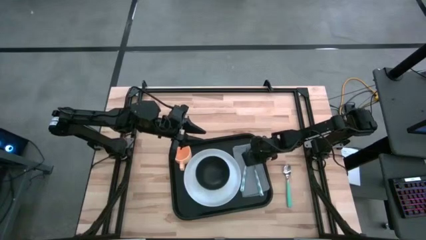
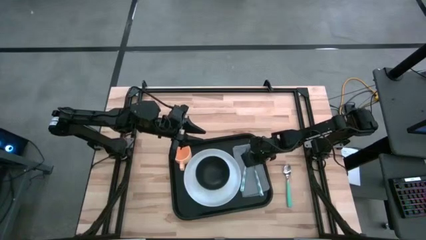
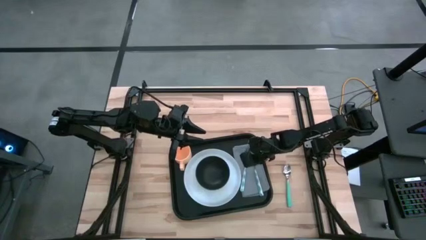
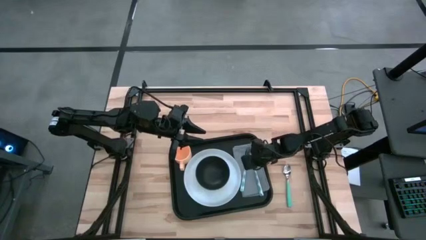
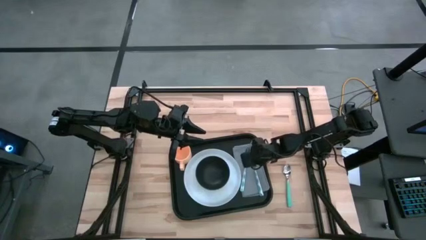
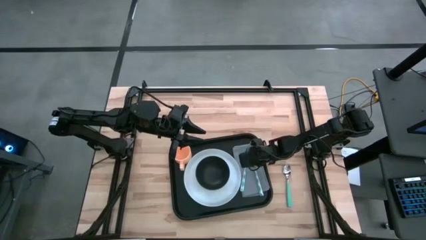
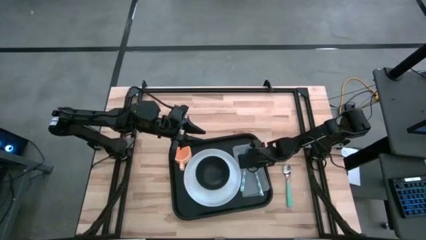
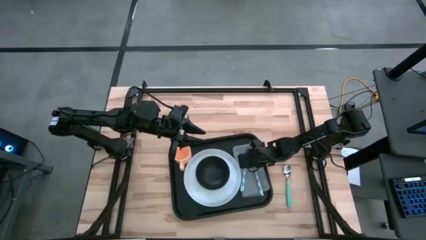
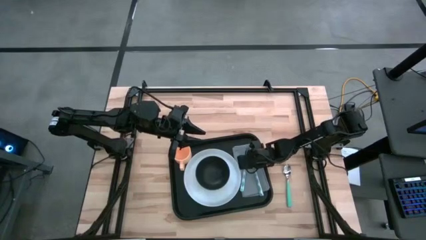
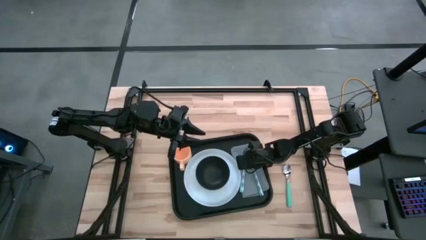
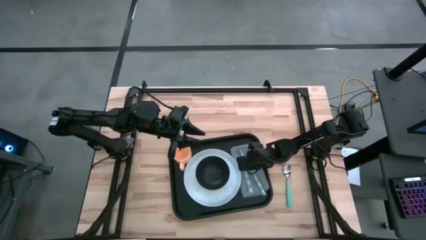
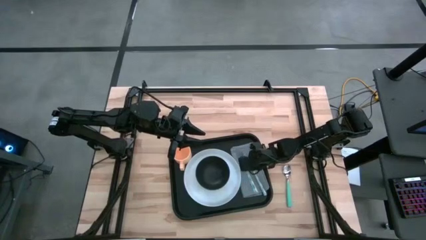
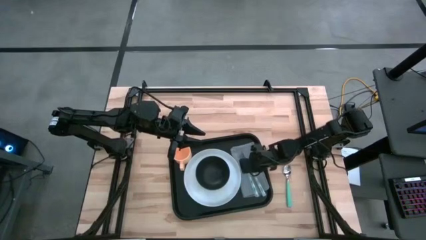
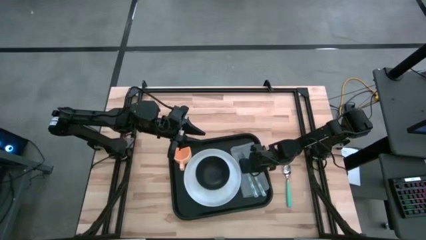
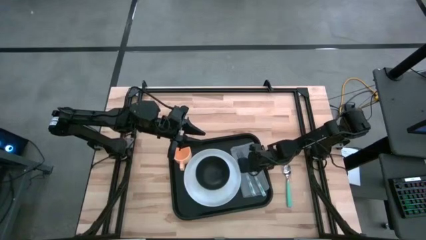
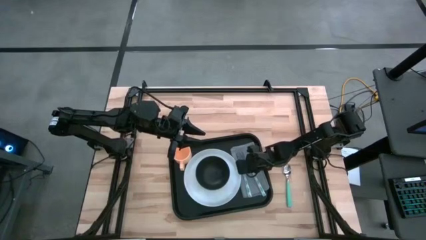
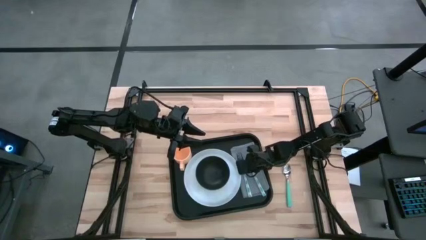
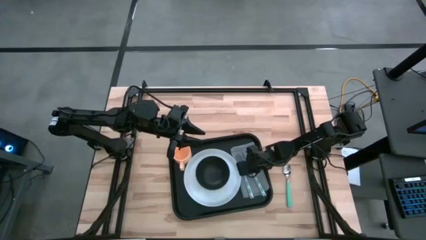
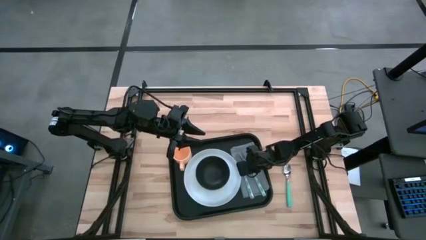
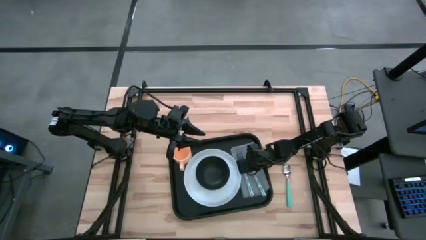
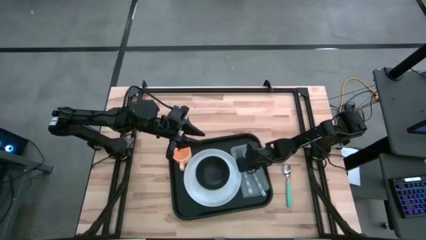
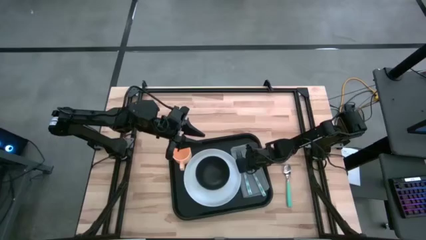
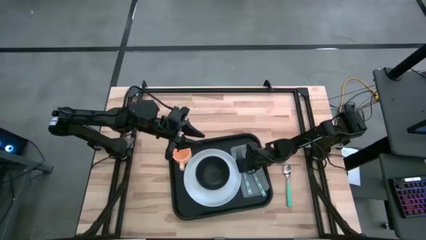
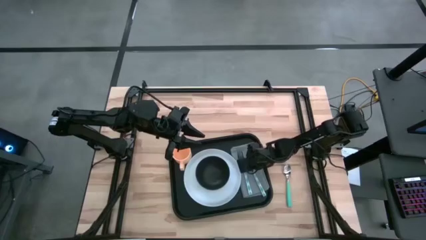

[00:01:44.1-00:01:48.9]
Task: Set up tray
Adjust the blue fork on the gray napkin

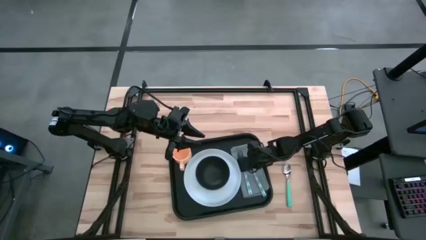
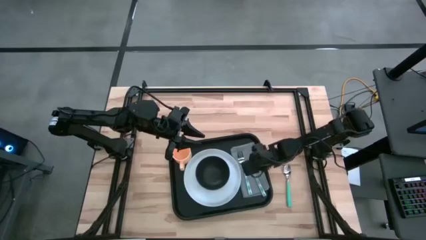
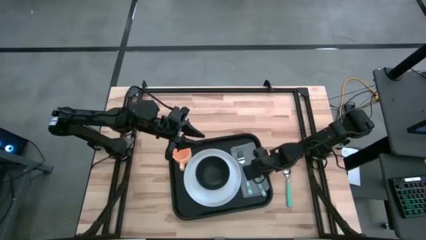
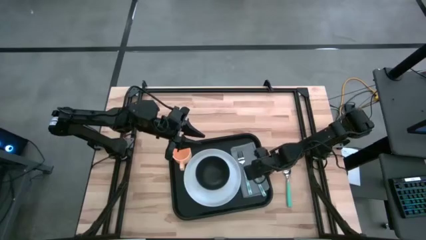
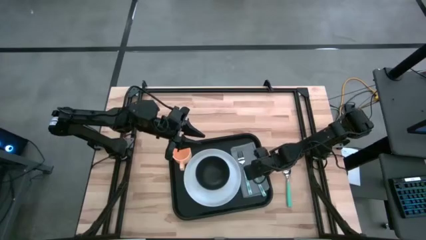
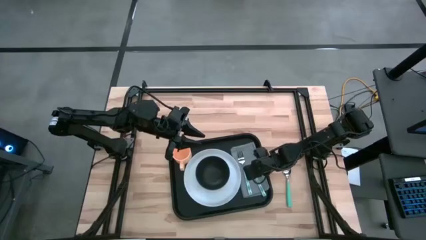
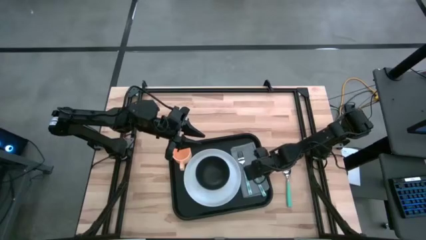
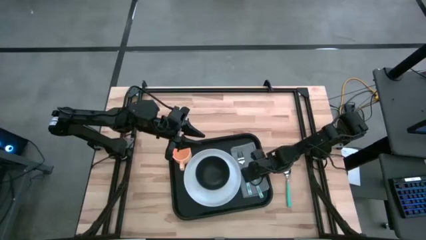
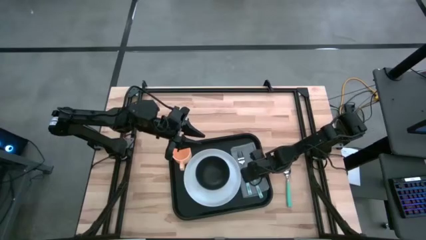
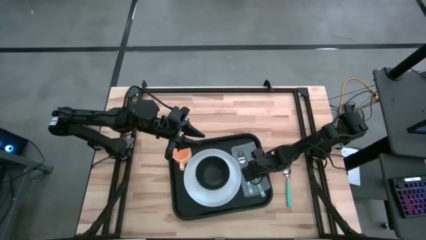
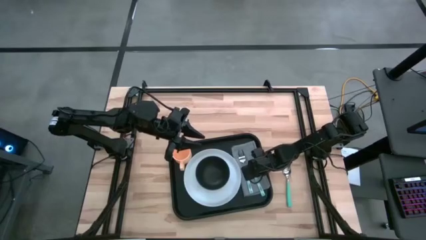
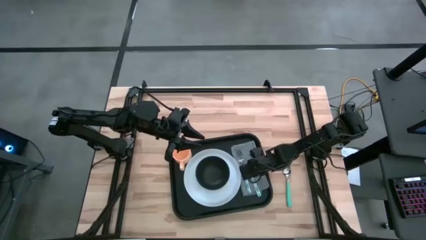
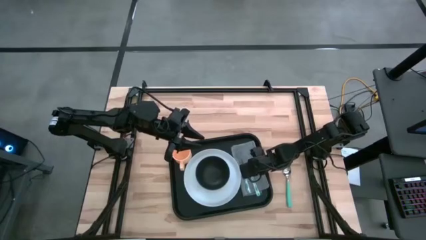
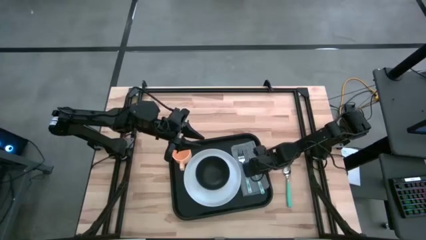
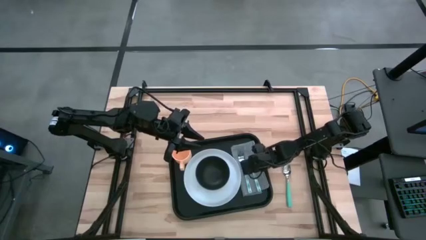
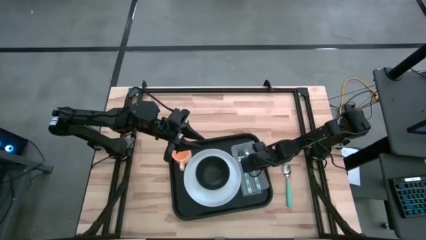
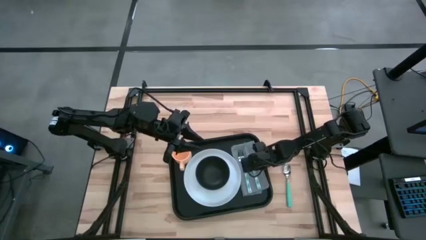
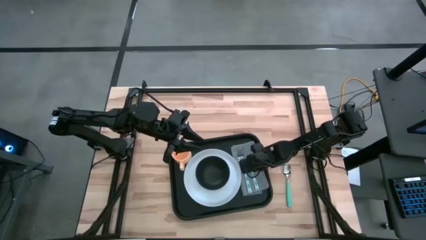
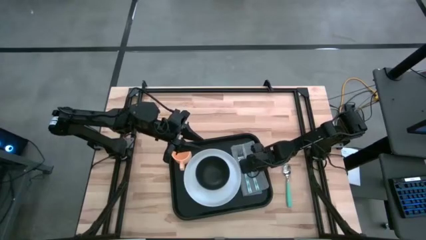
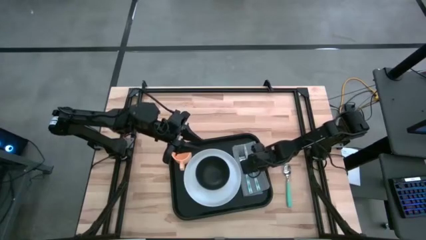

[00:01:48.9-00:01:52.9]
Adjust the blue butter knife on the gray napkin

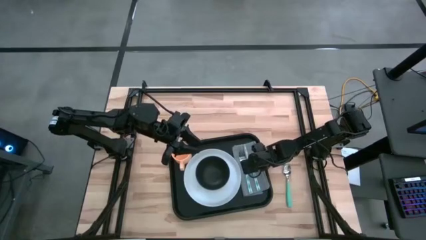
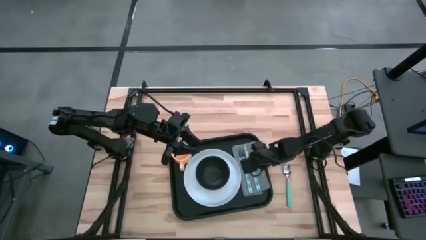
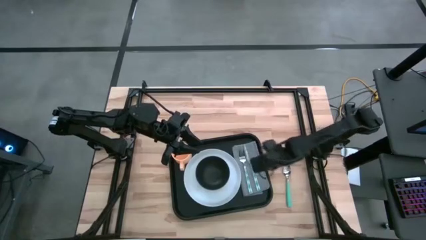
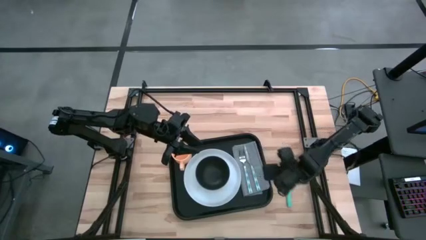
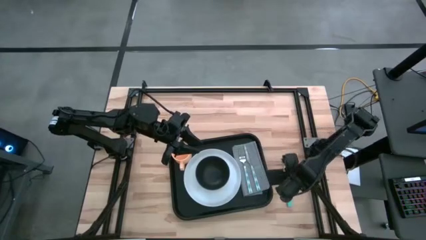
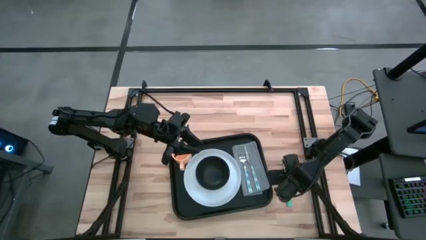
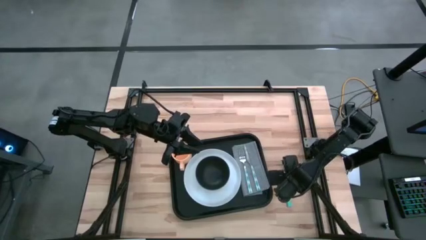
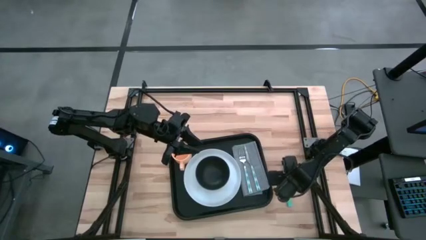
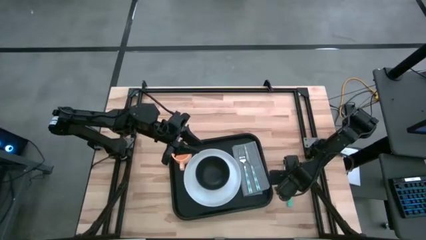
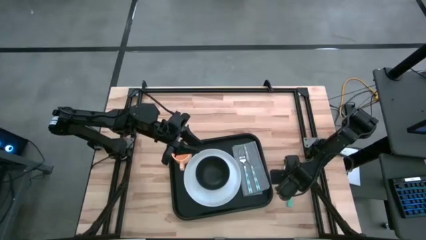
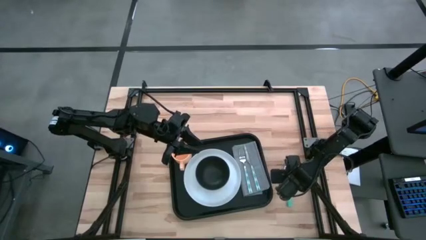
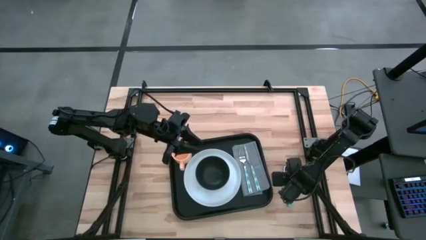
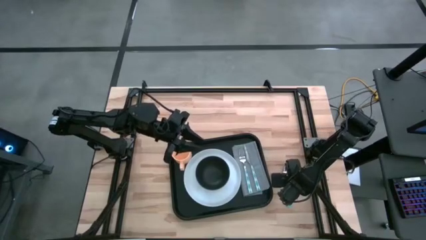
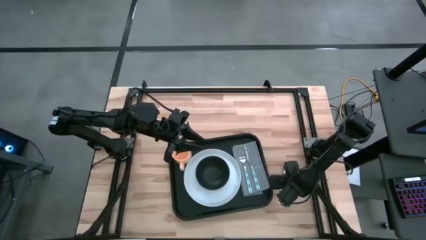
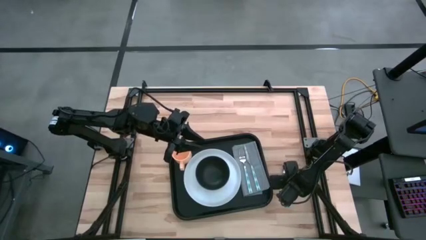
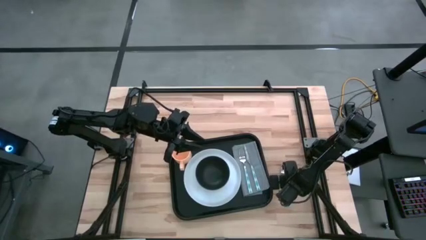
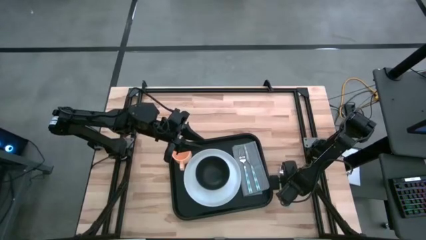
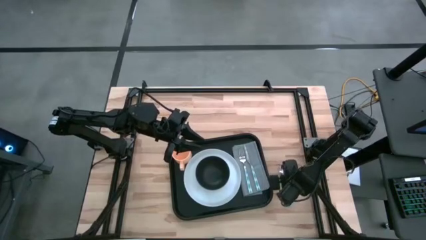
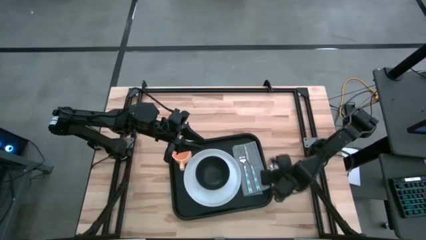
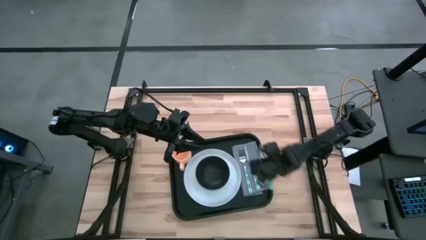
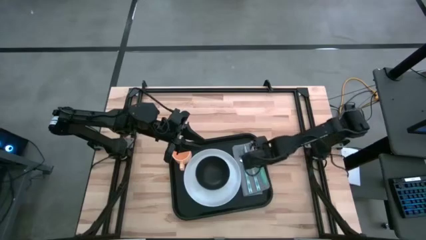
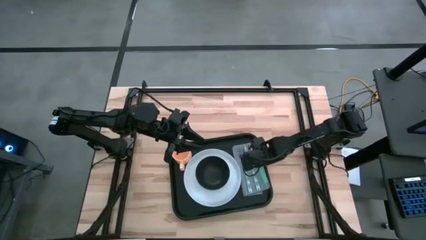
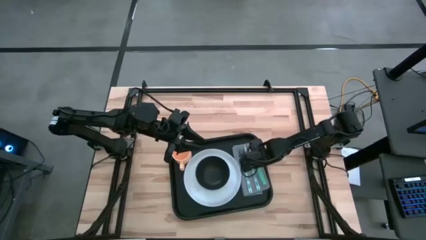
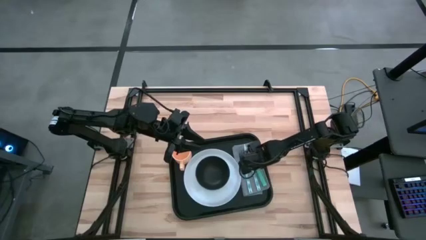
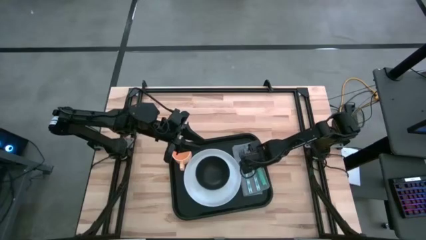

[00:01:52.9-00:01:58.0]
Put the green spoon on the gray napkin to the right side of the blue butter knife

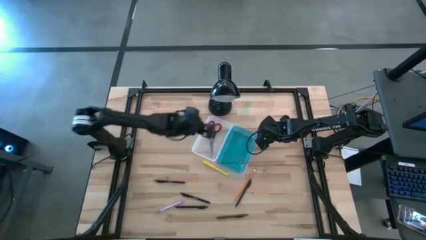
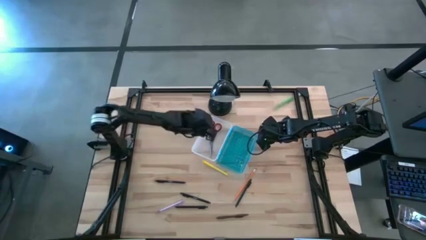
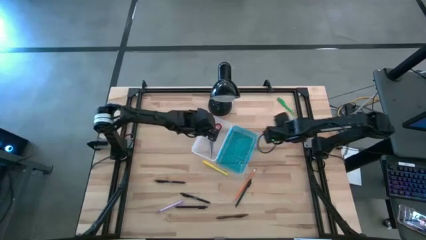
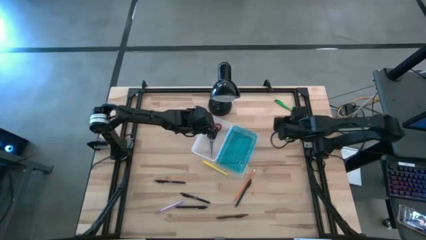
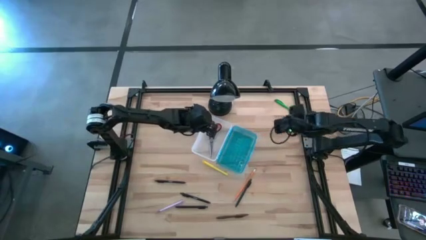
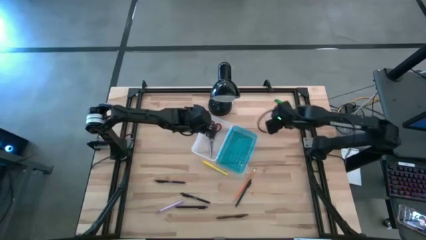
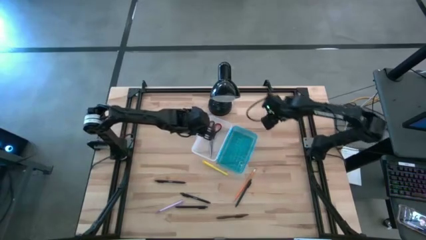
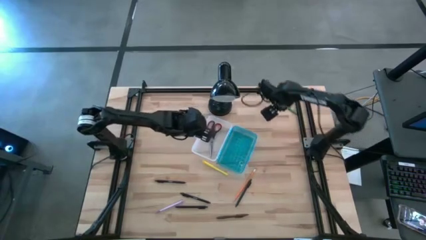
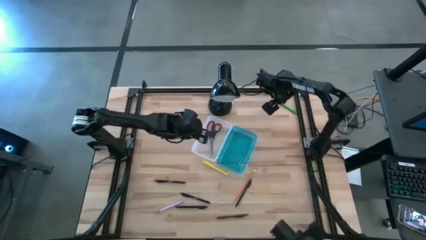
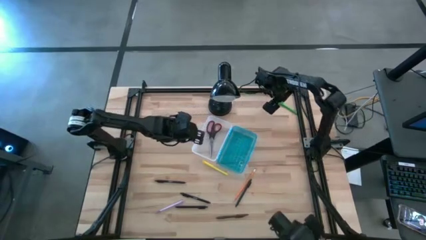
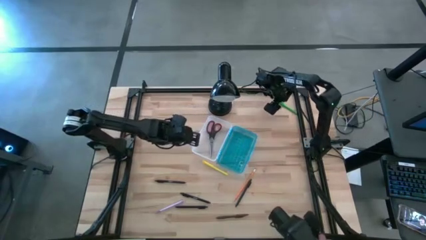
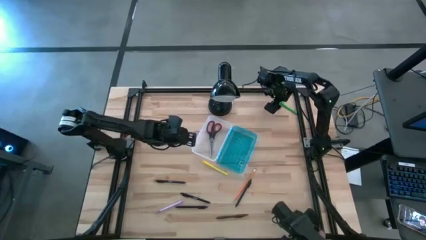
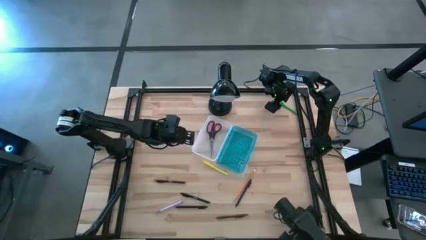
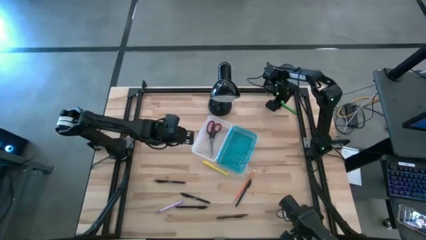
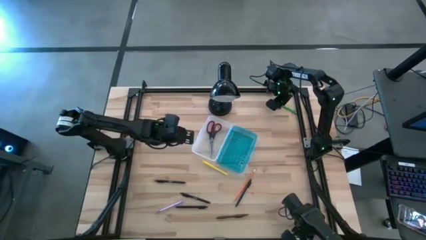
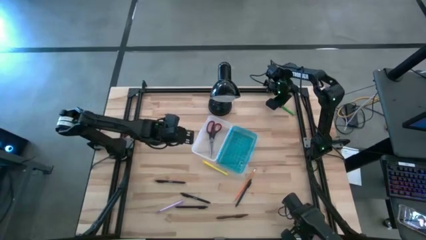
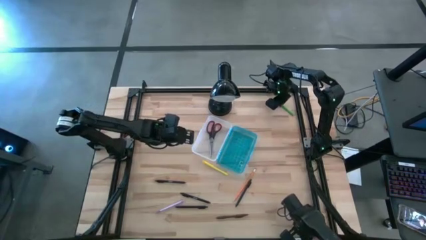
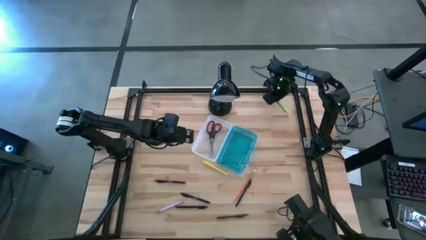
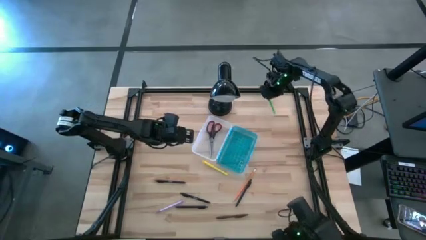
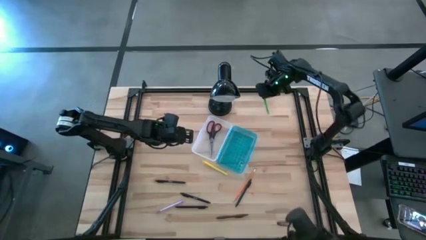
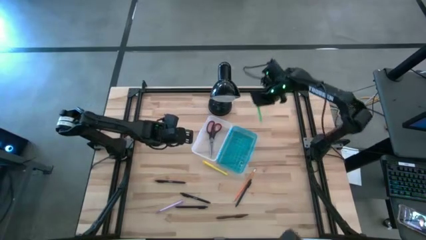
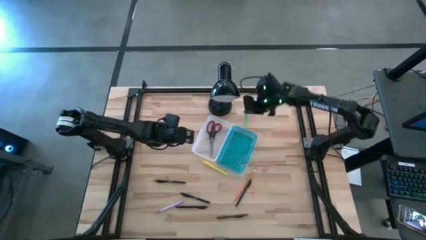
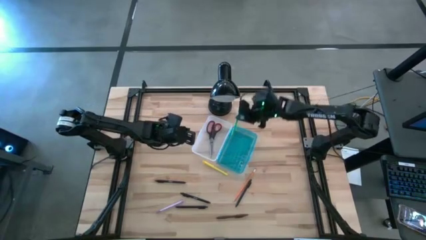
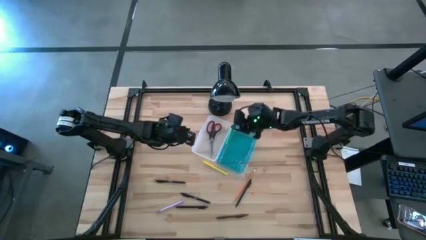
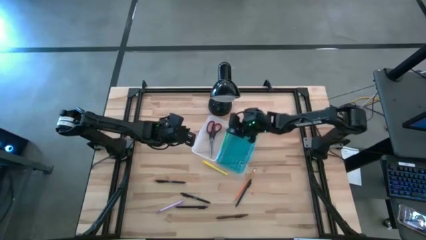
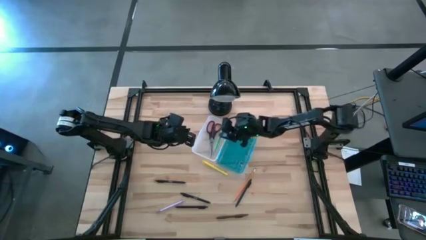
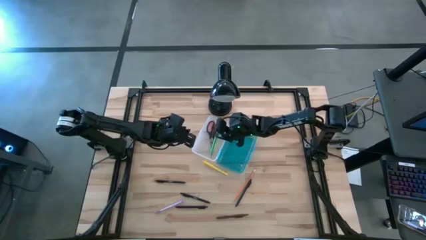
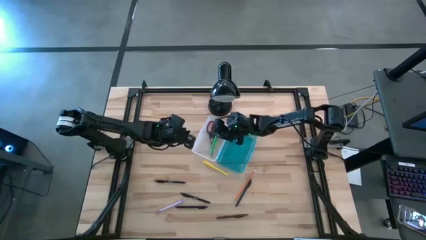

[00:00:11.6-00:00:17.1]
Task: Pick & place school supplies into a supply box
Put the green pen into the supply box
